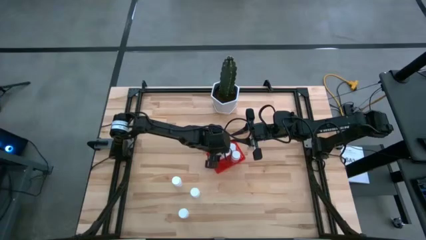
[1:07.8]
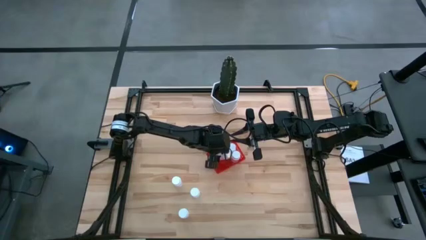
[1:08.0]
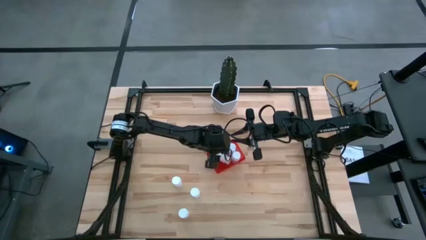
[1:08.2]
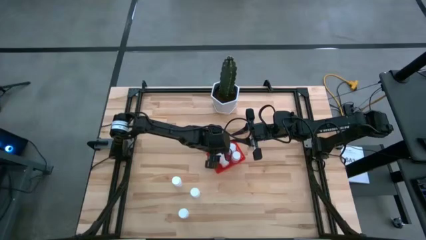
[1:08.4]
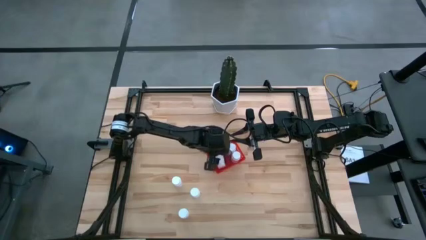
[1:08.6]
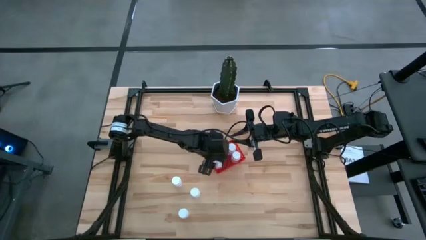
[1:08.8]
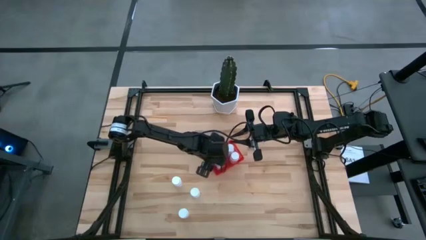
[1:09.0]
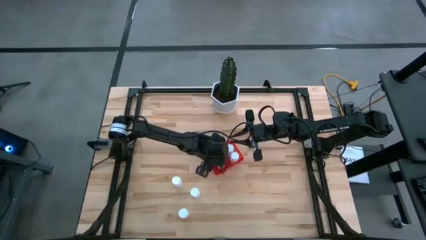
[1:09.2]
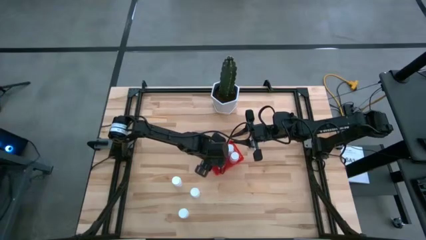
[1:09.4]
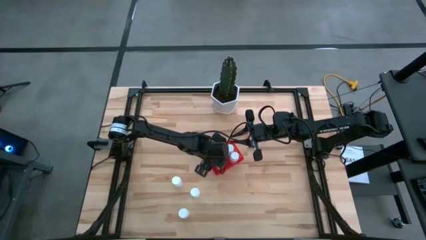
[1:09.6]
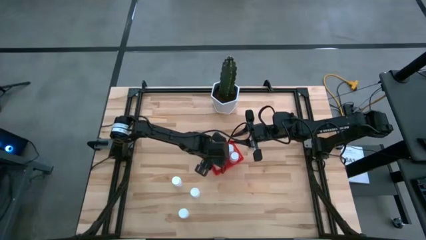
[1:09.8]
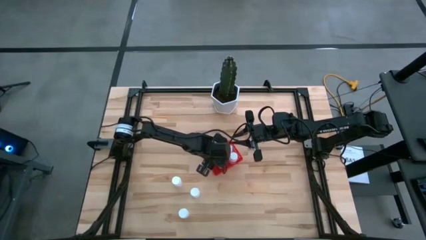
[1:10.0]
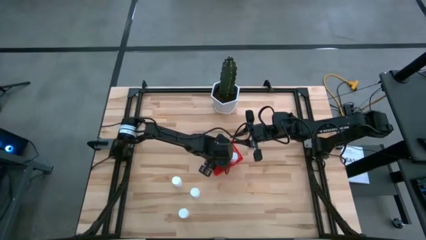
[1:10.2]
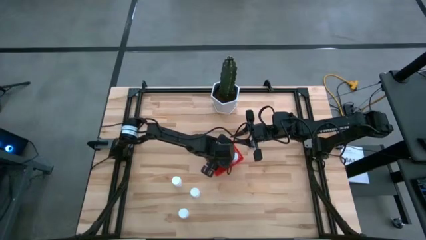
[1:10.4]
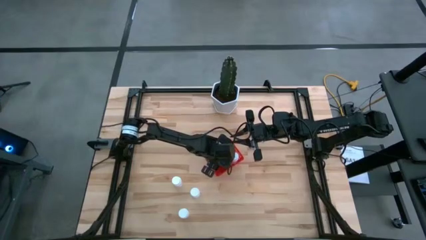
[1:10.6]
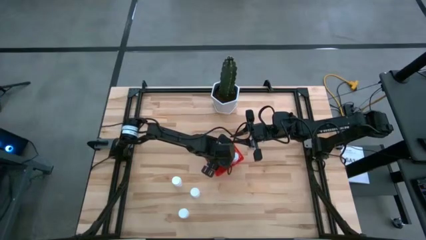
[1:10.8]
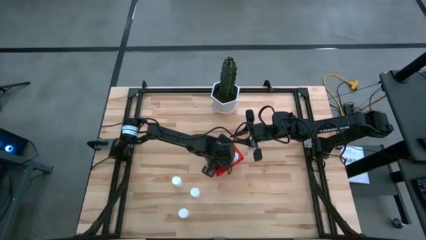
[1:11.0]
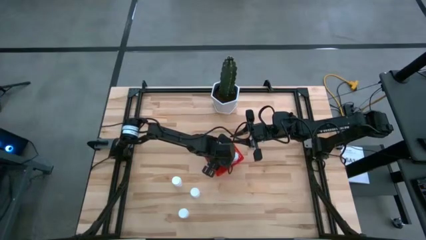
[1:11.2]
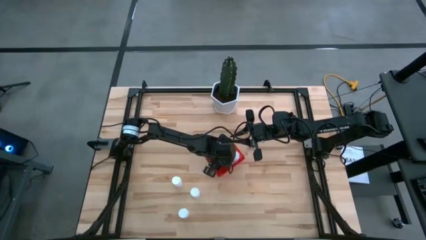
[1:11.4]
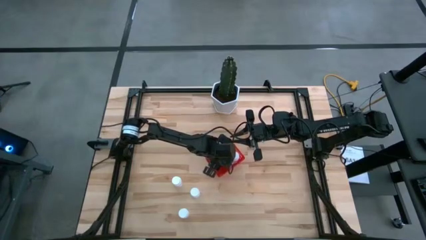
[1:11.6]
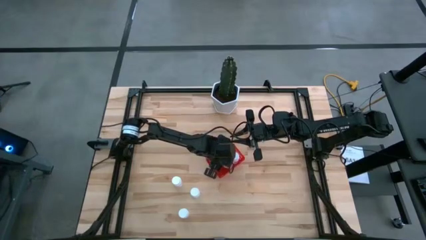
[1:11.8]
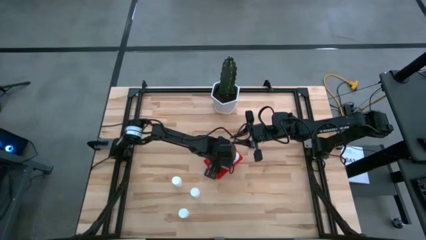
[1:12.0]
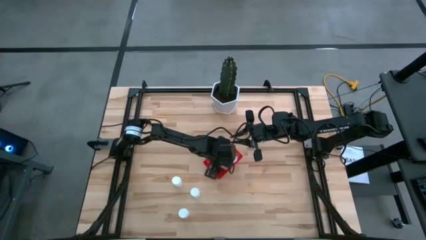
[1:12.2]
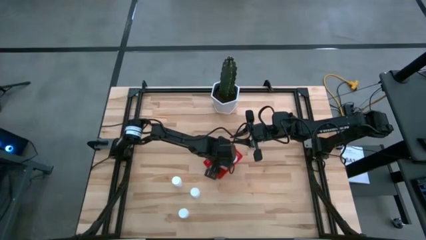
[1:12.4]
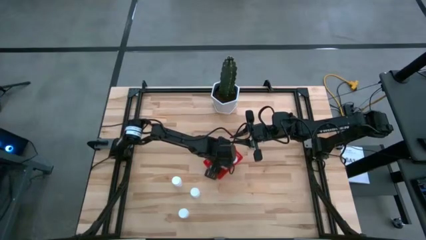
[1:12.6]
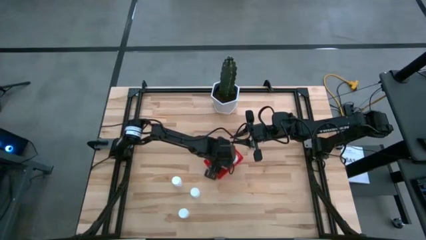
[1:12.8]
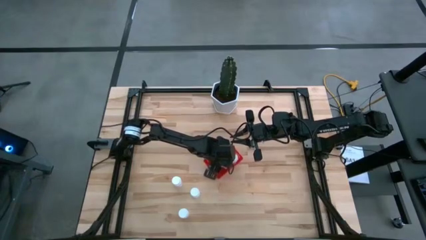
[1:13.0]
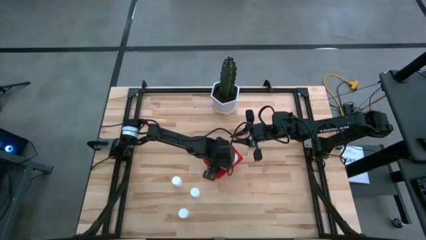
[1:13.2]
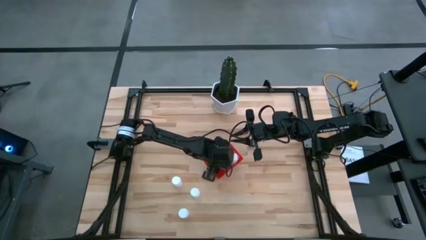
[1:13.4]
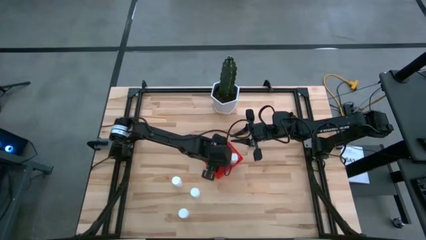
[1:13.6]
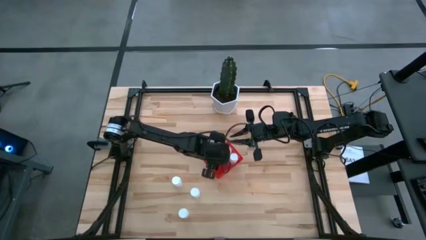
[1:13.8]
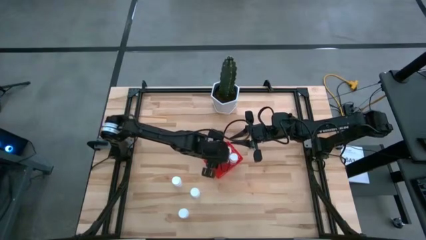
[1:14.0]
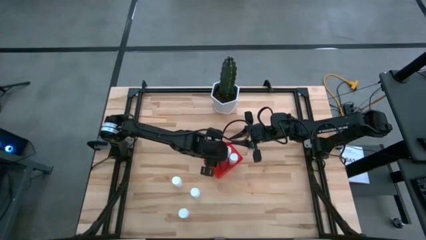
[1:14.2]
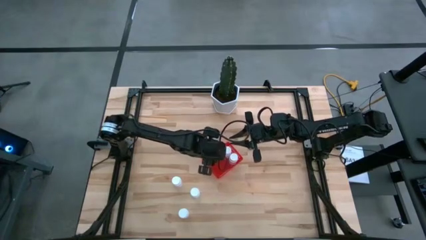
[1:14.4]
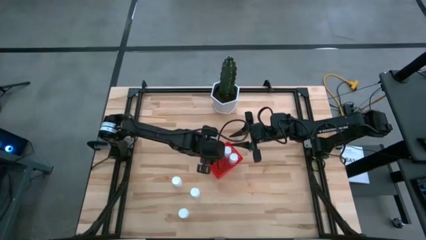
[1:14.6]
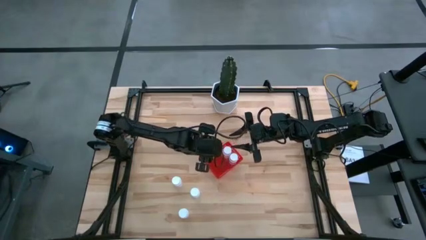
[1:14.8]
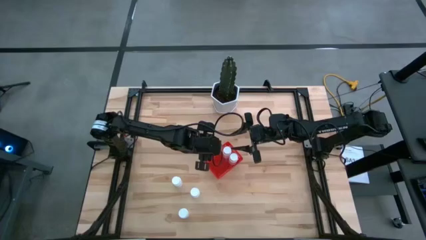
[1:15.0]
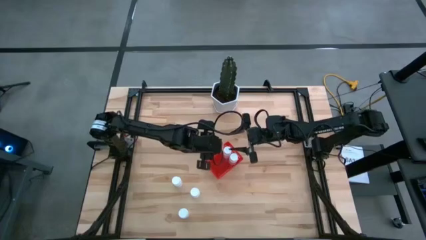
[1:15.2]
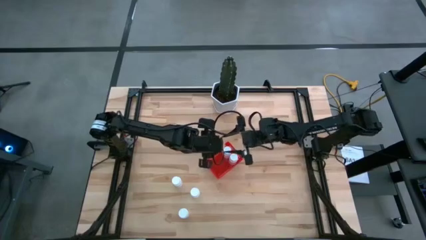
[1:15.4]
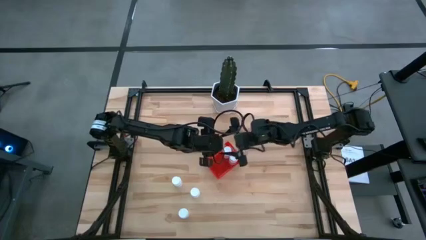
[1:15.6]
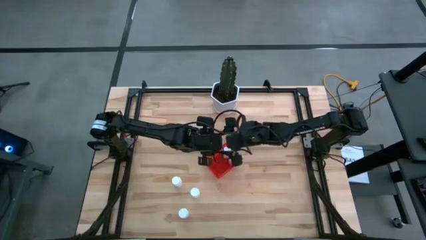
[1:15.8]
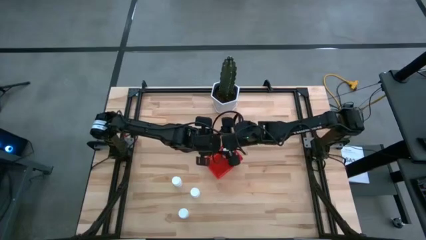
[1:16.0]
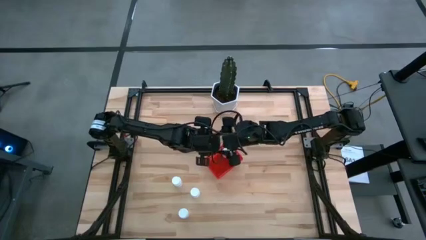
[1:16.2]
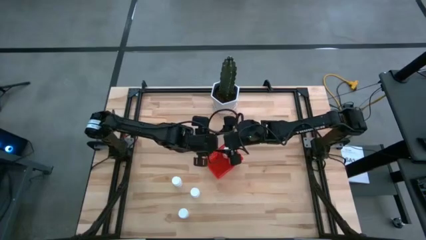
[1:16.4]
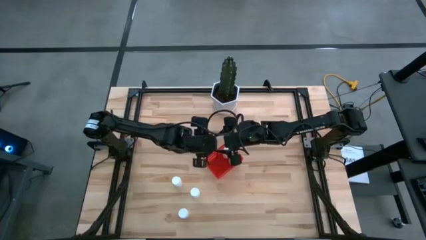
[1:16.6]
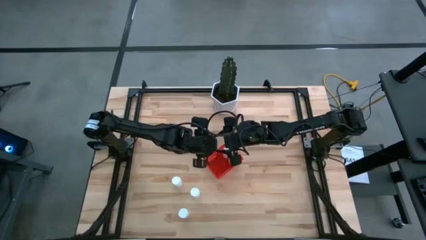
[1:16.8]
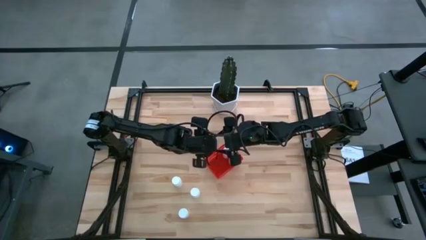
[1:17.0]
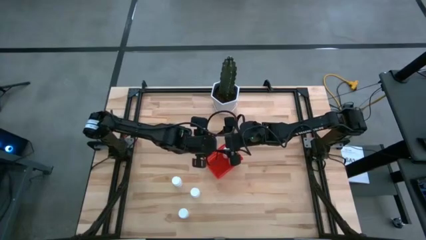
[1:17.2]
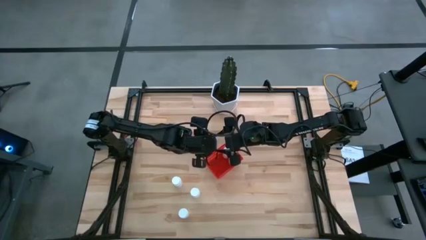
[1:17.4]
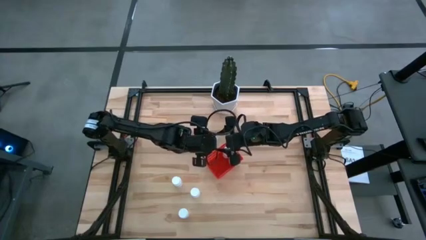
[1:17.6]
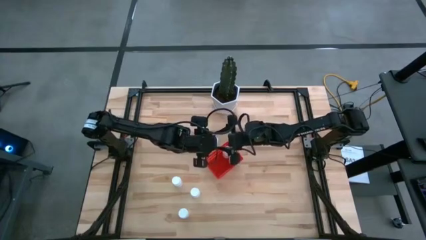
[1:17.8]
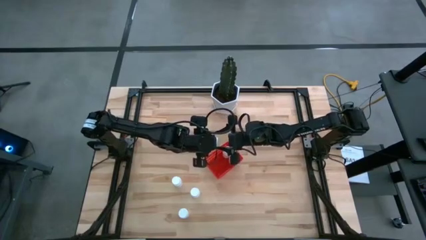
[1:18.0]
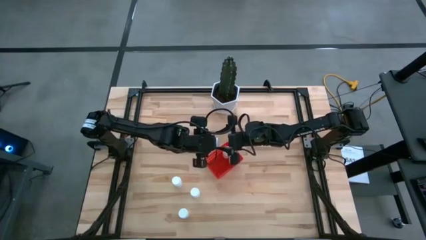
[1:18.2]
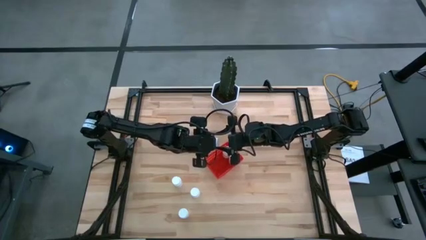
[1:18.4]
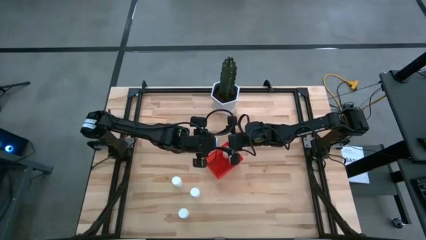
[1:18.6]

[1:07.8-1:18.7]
Task: Pick and place pill bottles into a basket
Put the white pill bottle into the red bin

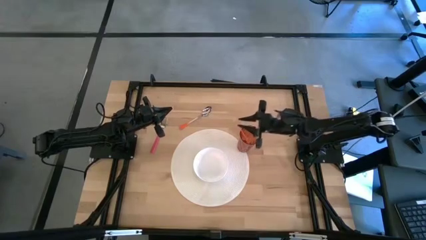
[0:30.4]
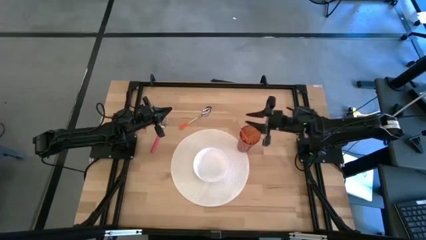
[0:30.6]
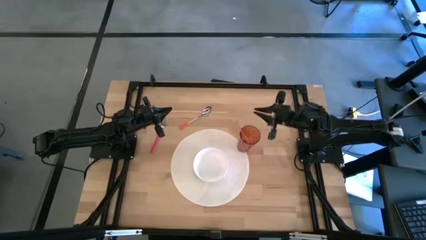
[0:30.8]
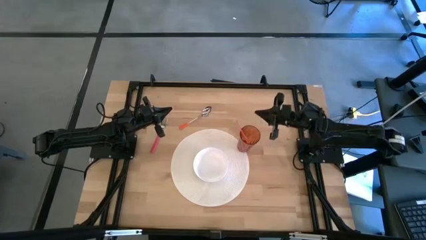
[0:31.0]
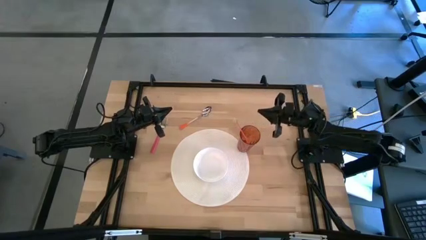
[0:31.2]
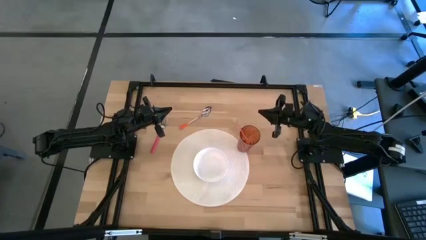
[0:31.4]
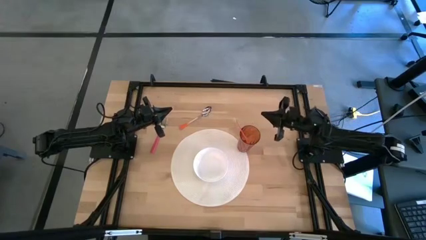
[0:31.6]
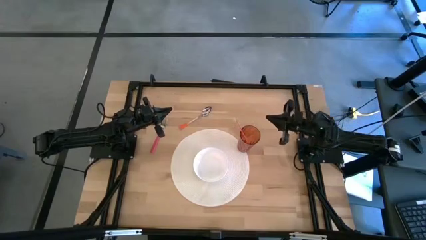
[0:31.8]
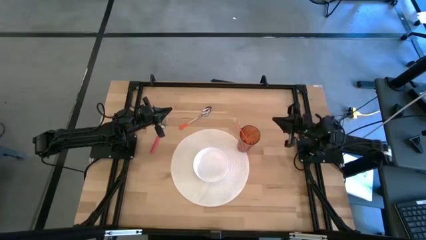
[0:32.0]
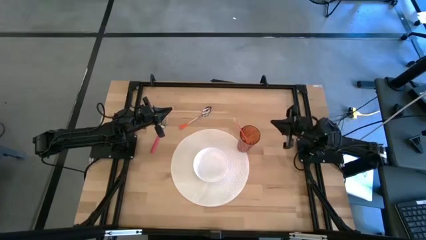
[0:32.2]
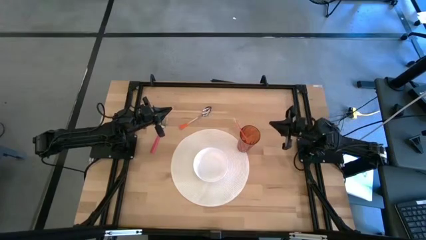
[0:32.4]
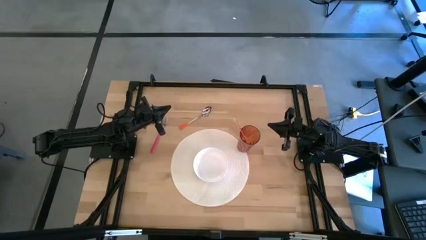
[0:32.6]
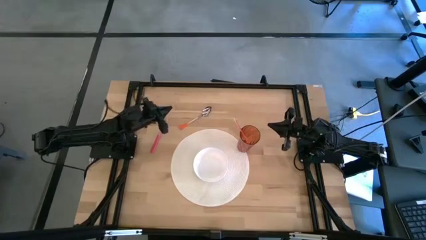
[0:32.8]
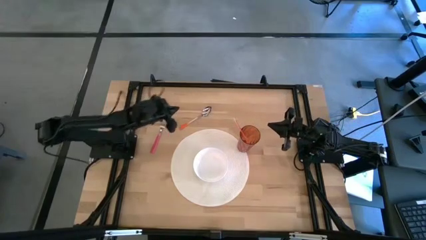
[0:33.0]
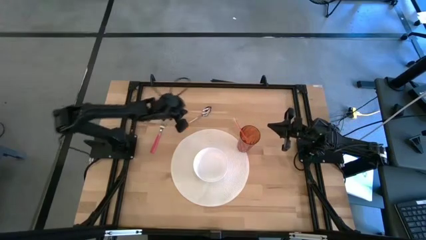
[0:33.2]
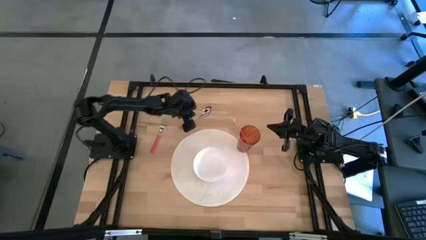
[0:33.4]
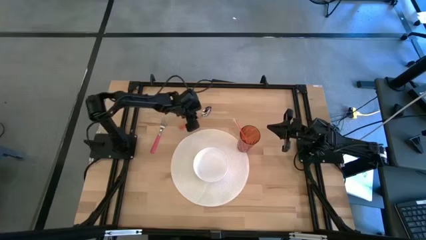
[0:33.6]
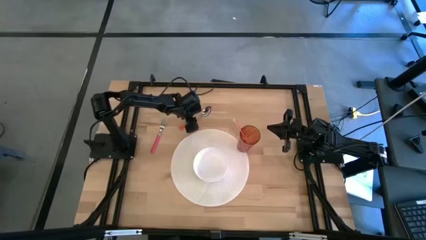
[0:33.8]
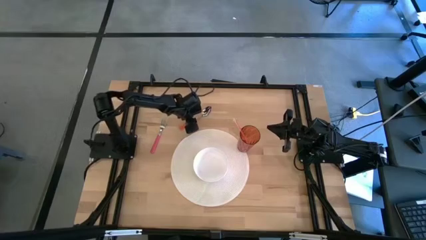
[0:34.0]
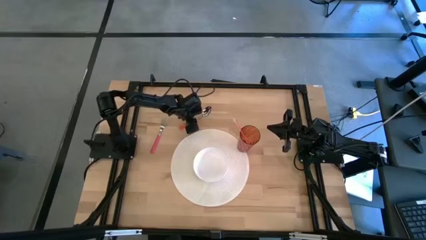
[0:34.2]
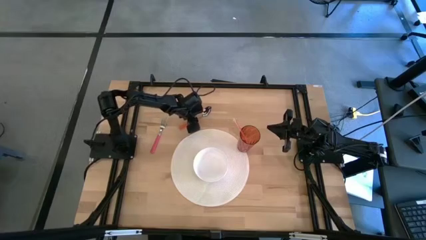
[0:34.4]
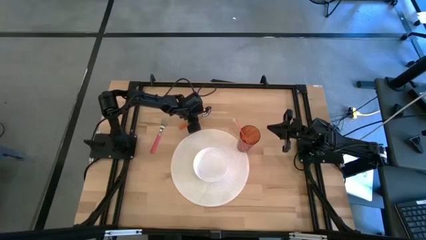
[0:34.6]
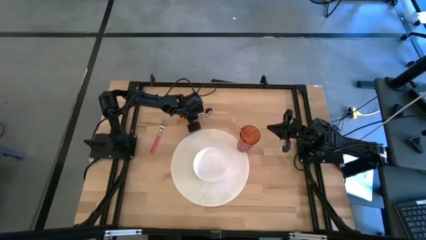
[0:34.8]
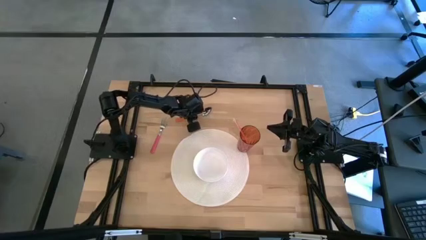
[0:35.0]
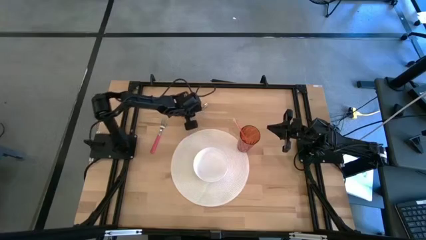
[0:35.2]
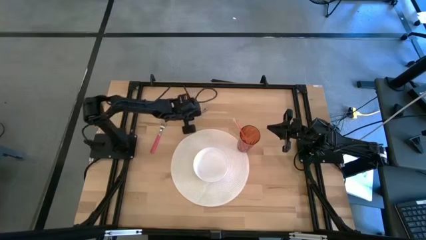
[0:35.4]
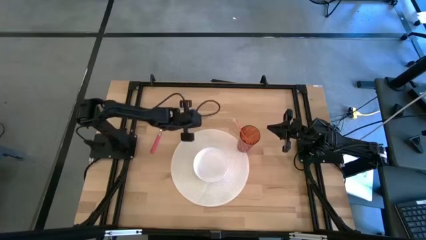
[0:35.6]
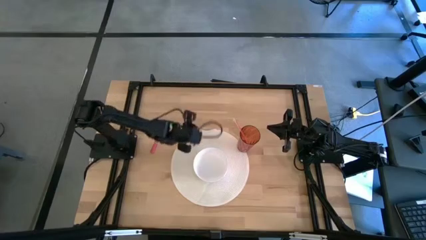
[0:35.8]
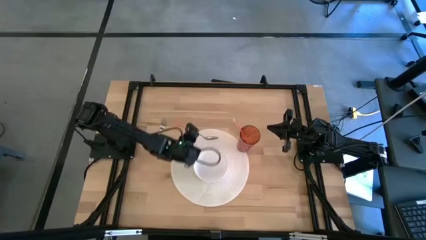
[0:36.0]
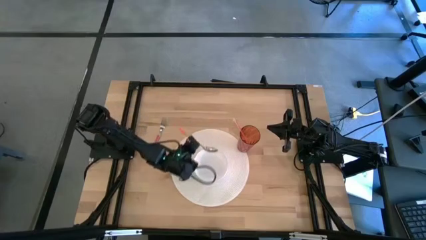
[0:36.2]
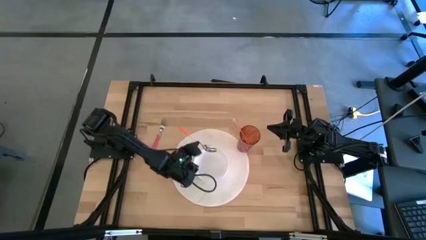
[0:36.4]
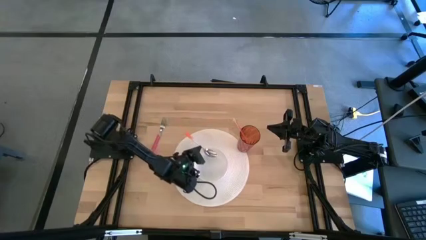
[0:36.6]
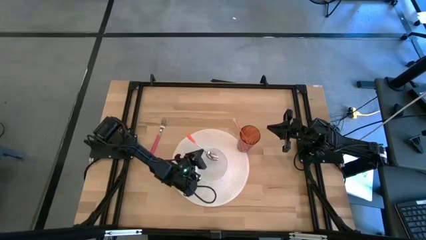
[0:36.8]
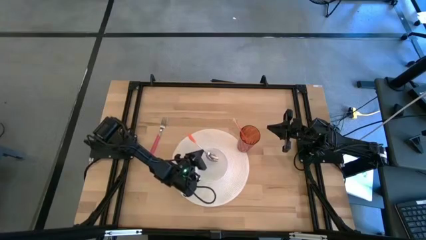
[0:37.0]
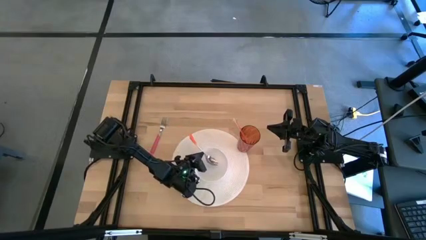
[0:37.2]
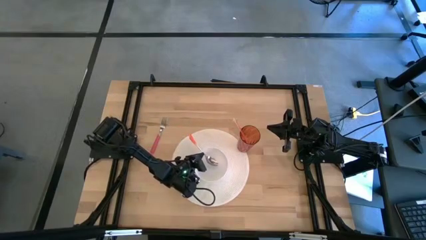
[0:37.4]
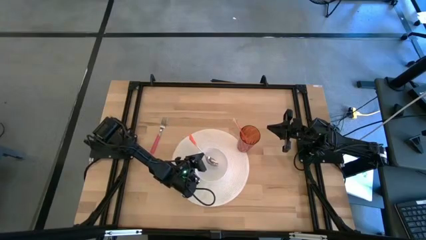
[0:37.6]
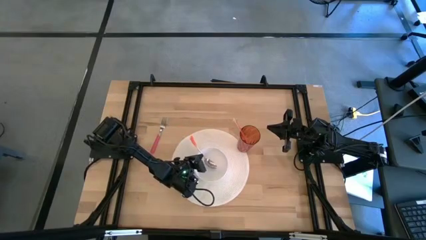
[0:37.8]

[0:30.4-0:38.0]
Task: Pick & Place Utensil
Put the orange spoon into the white bowl on the mat
